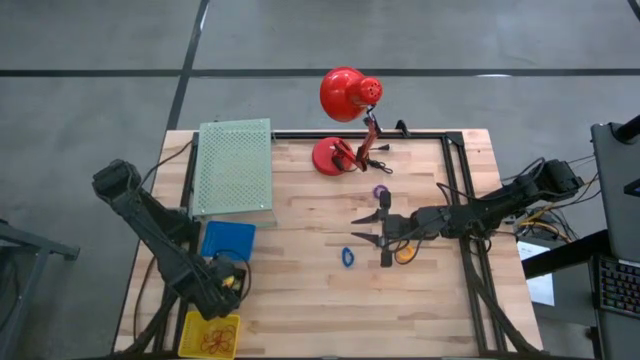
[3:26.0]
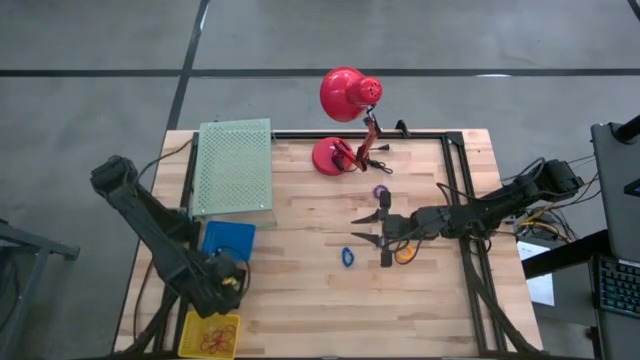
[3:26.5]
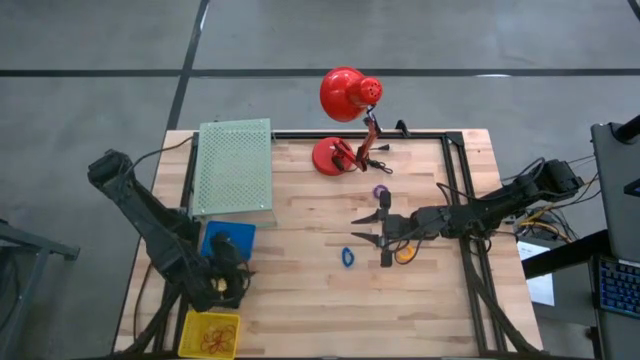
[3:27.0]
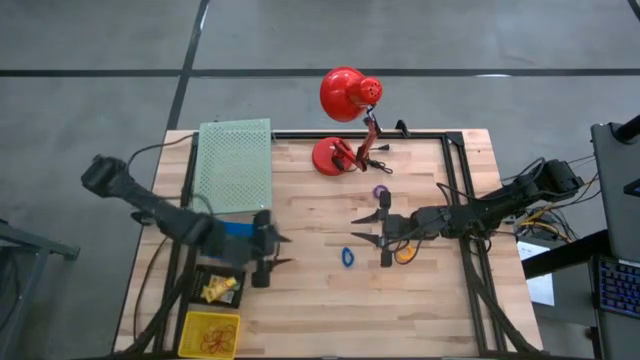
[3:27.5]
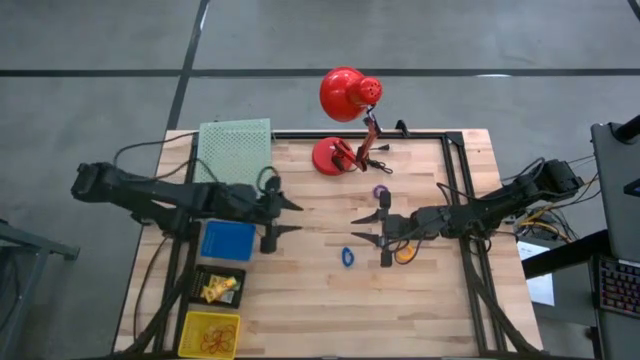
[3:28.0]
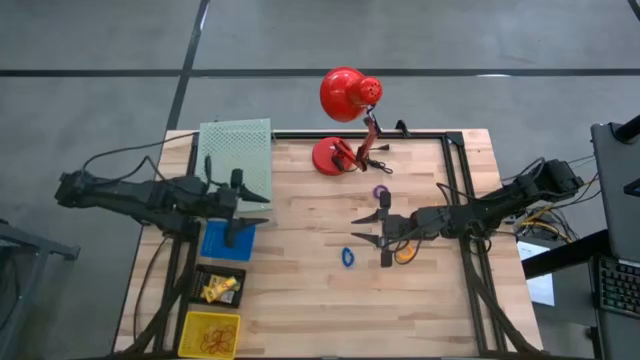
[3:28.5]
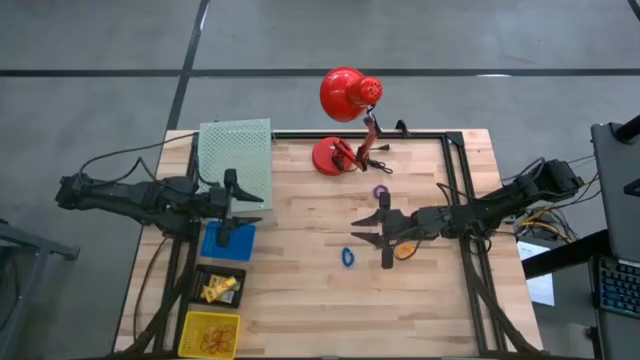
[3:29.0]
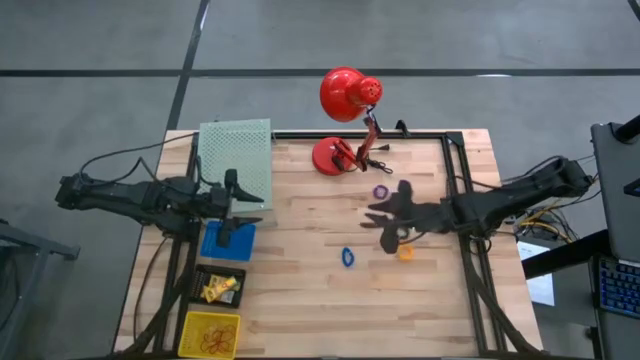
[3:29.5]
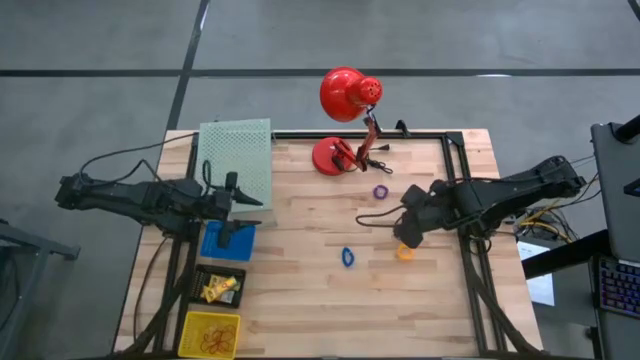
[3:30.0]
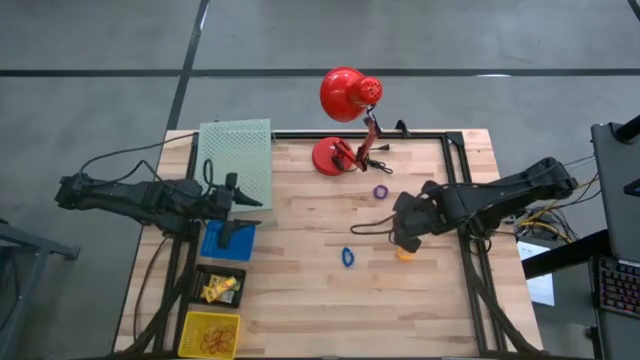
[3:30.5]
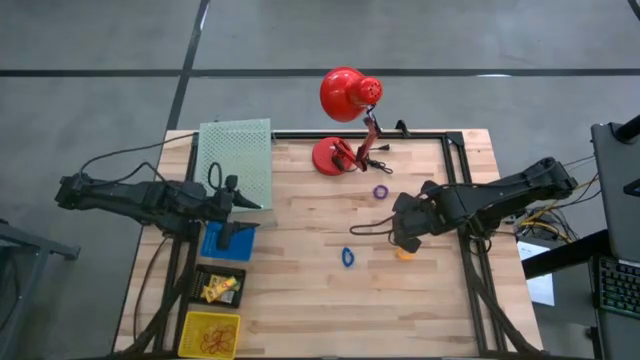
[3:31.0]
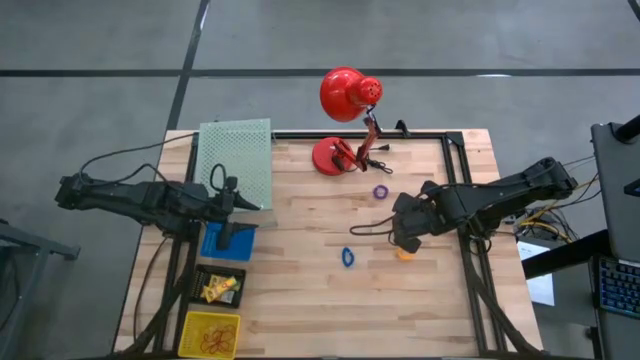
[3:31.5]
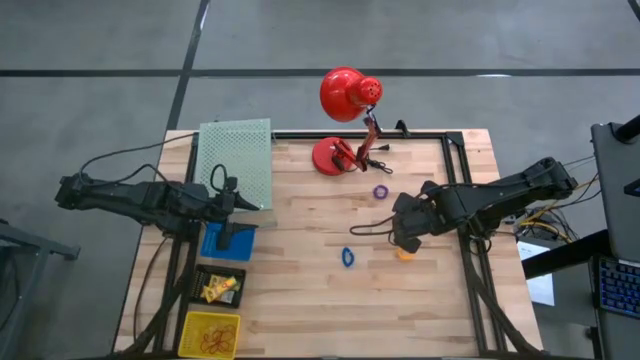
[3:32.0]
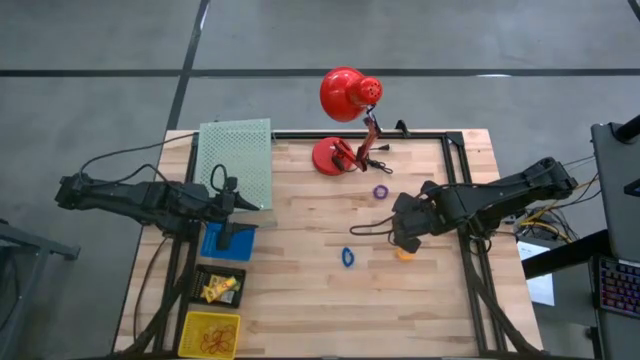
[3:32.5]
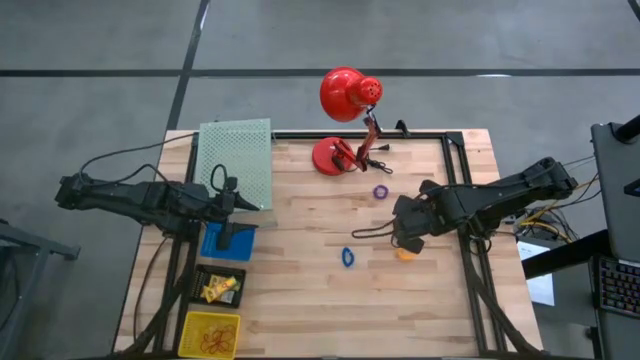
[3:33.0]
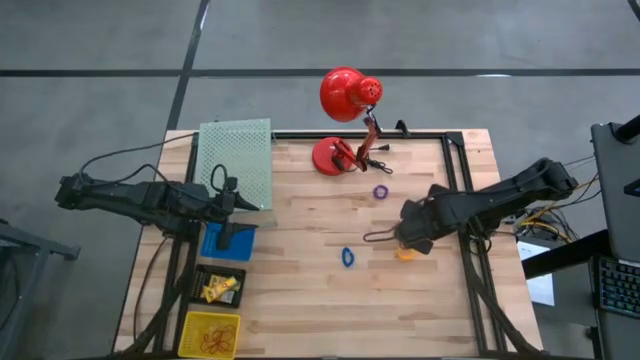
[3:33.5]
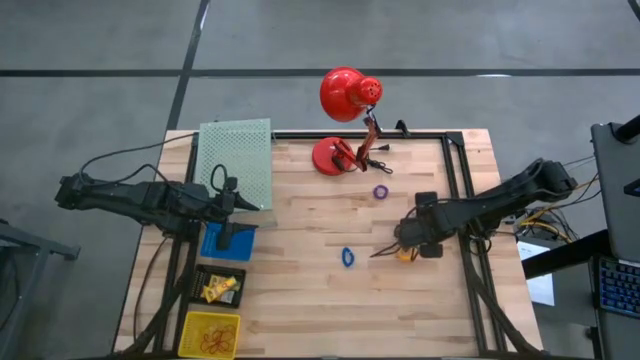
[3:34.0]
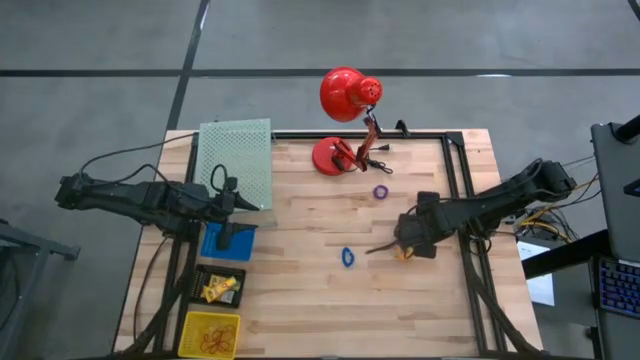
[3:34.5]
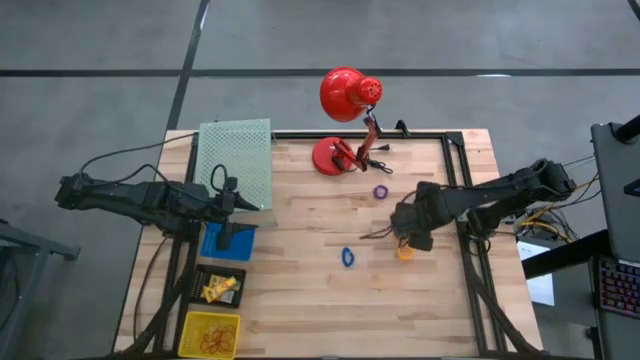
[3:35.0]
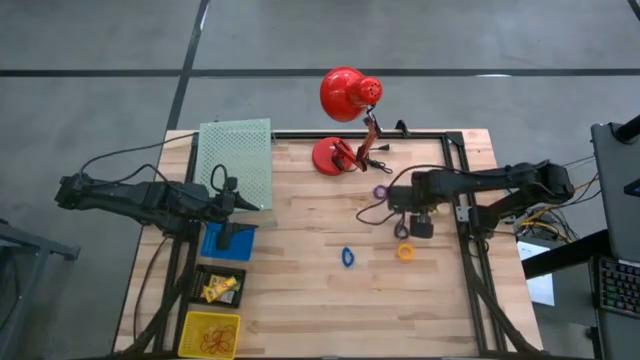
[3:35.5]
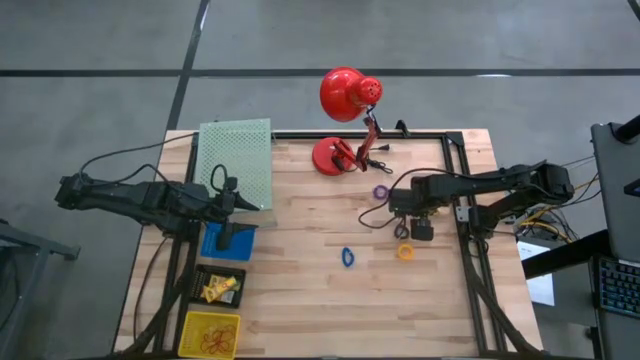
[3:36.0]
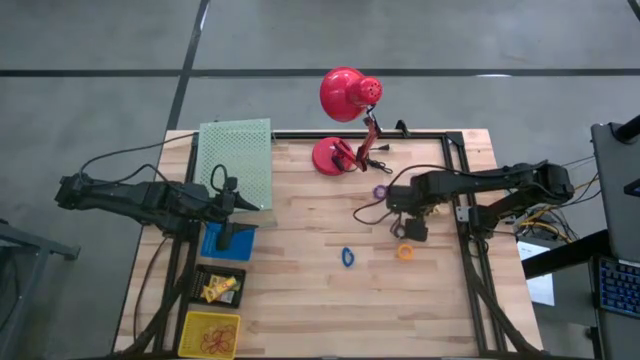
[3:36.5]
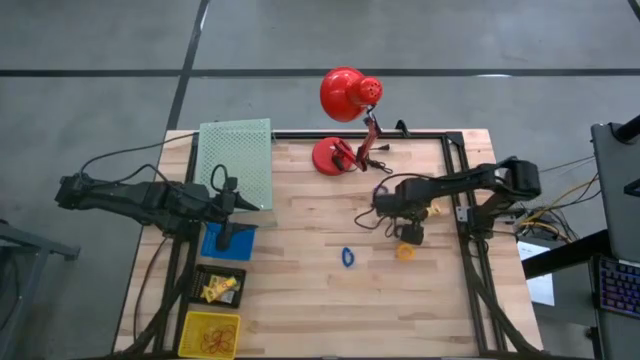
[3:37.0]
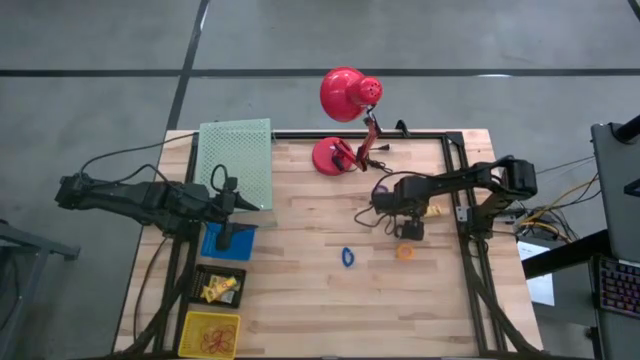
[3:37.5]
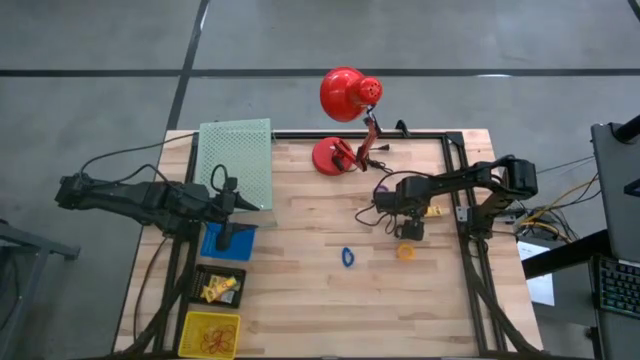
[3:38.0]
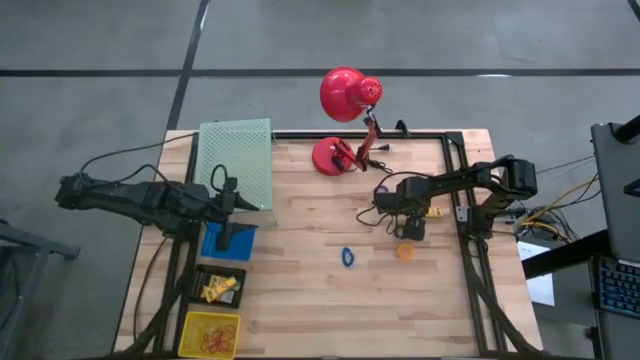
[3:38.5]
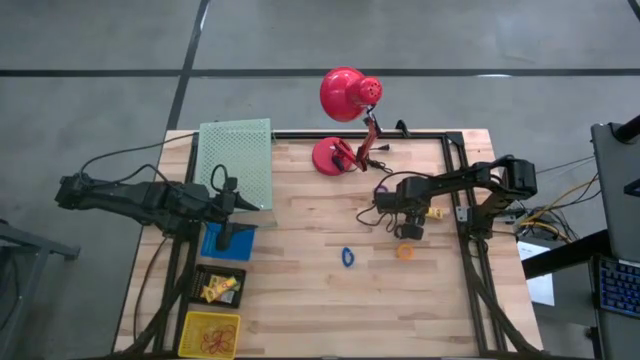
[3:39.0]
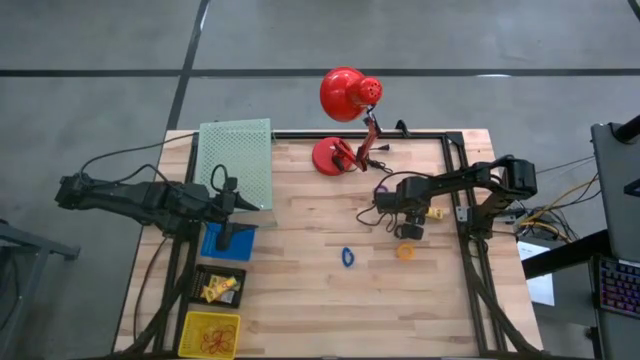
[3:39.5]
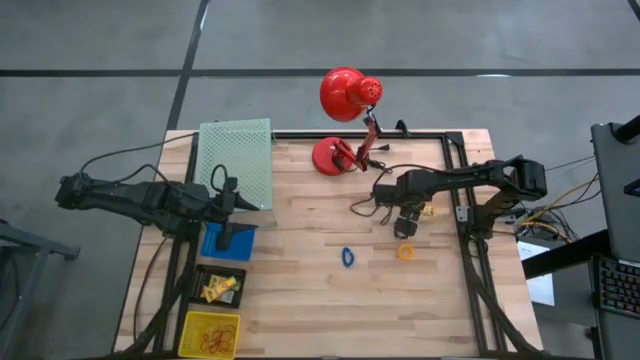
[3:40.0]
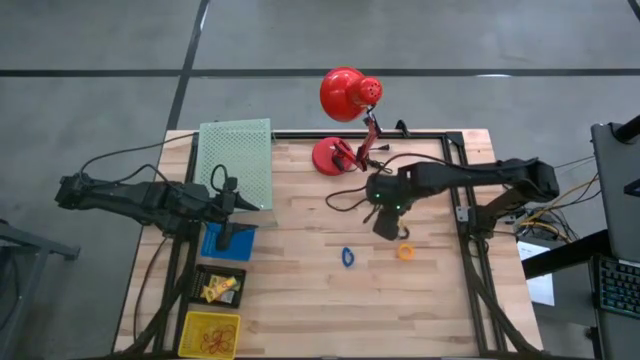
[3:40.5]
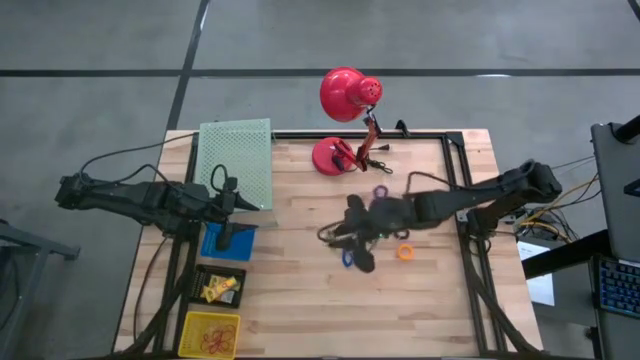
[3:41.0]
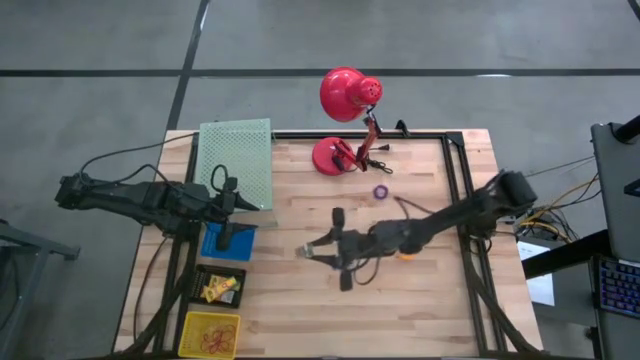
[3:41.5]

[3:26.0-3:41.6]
Task: Pick & Place Office Desk Supplies
Put the crayons box into the black bin

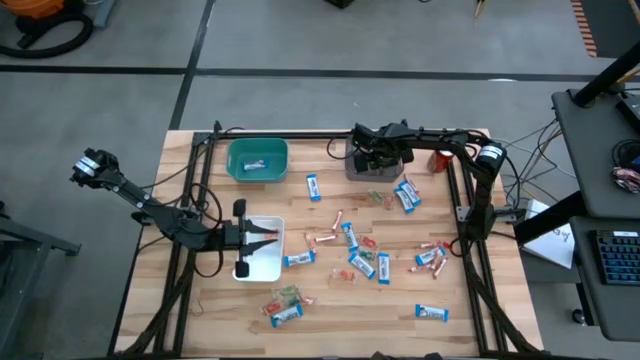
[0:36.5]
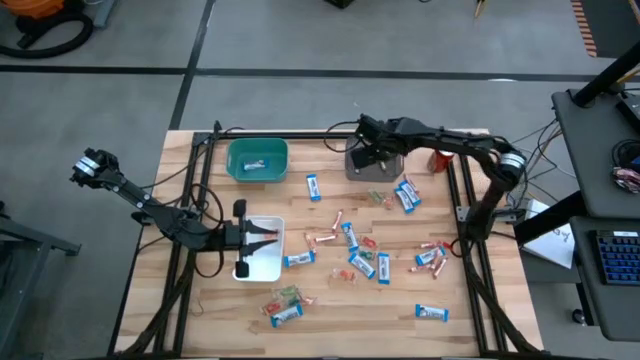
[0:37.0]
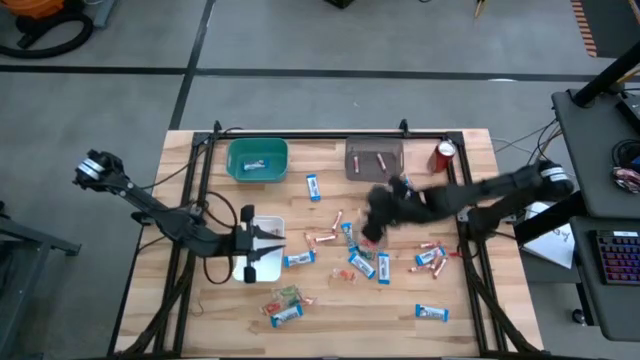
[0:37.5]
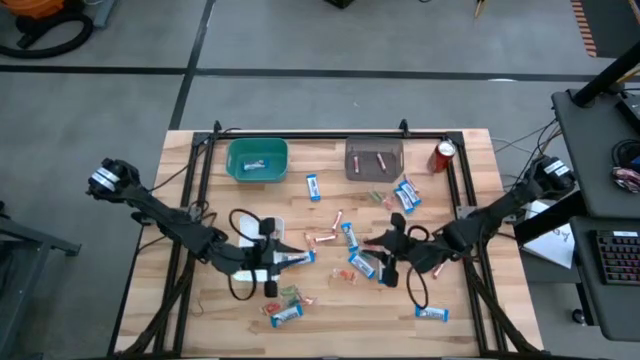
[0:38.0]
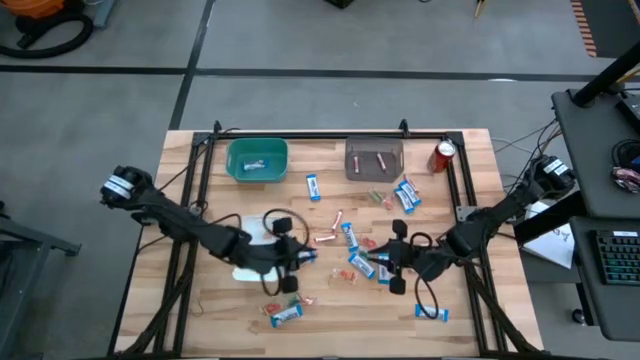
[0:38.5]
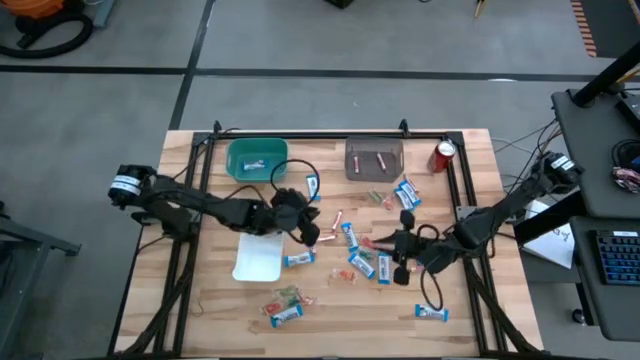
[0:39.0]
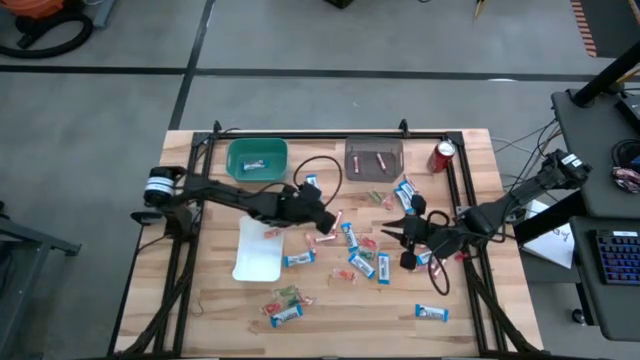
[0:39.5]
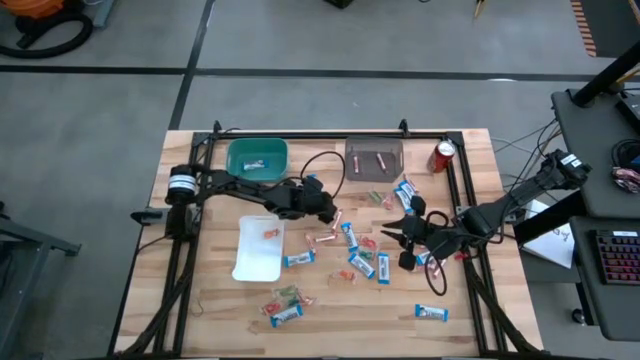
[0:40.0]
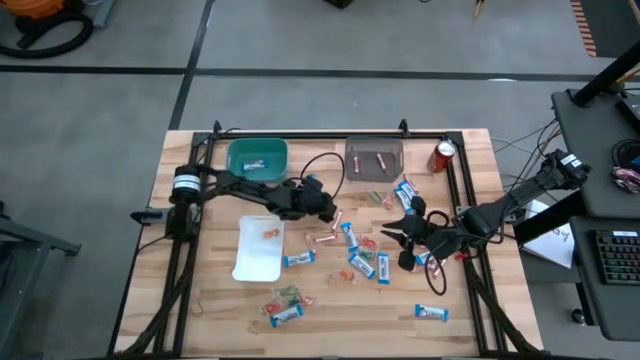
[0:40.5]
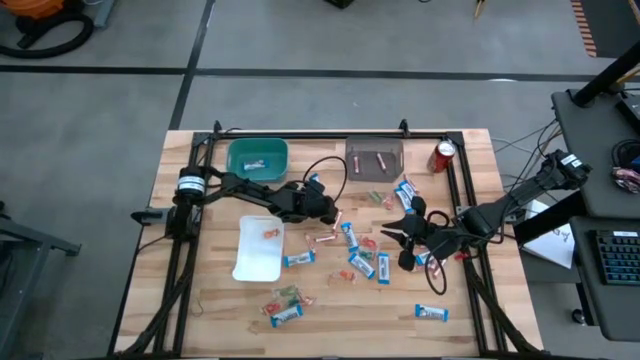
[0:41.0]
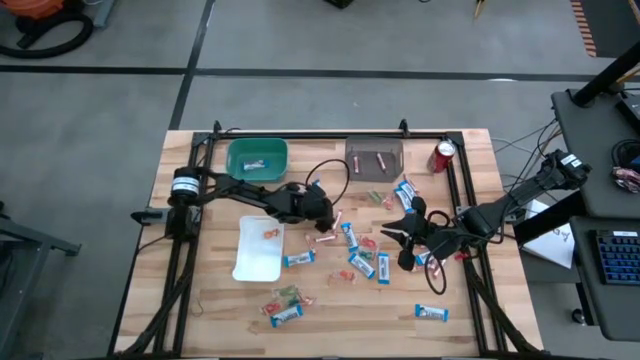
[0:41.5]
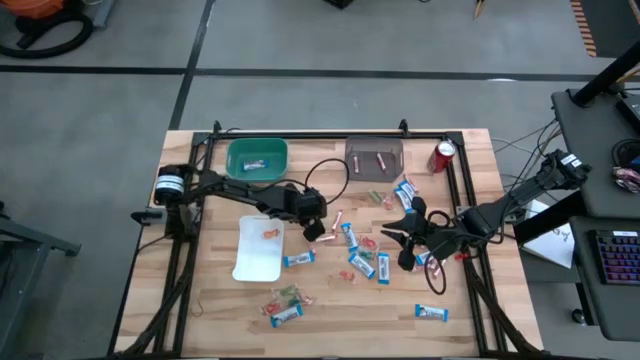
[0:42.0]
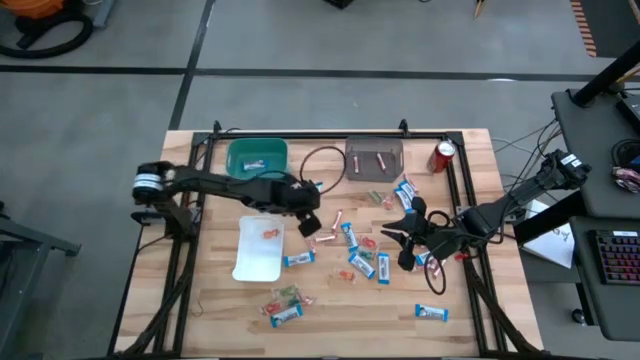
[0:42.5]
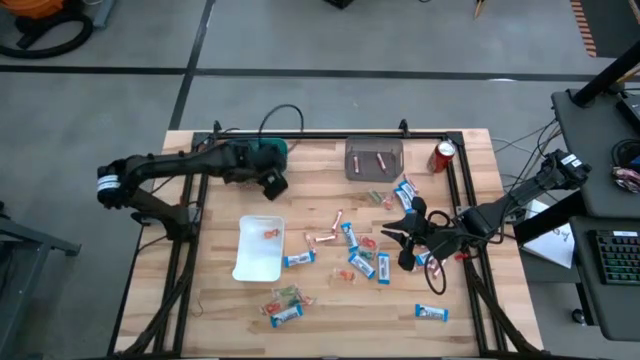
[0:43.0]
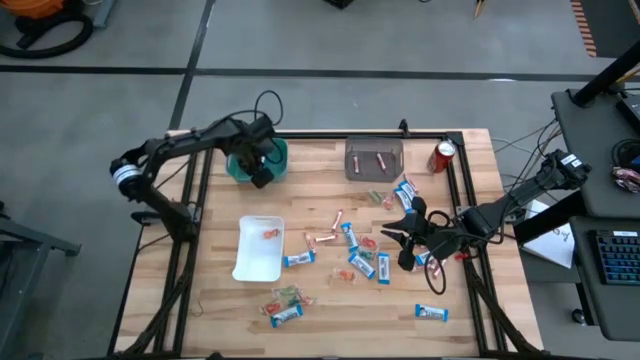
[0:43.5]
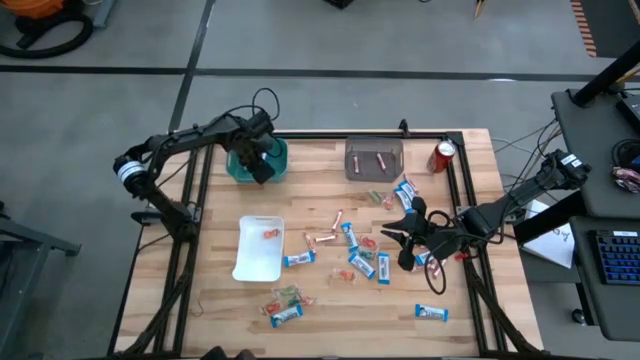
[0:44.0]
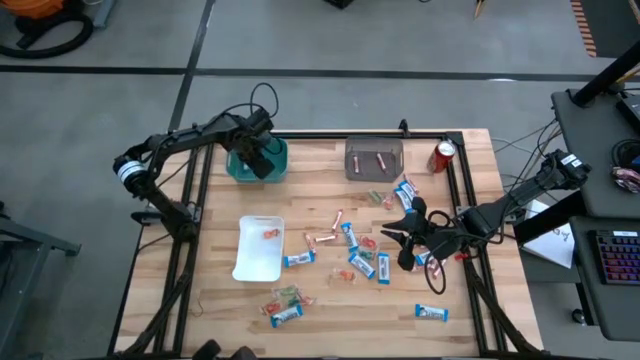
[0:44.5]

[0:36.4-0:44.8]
Task: Sort candy
Put the white chocolate bar into the green bin
